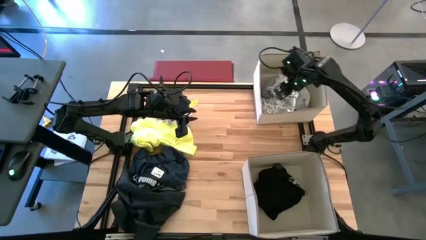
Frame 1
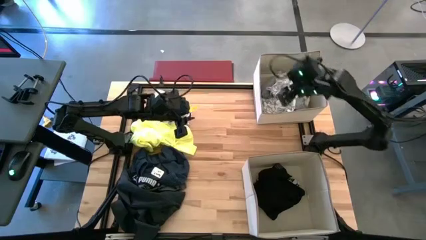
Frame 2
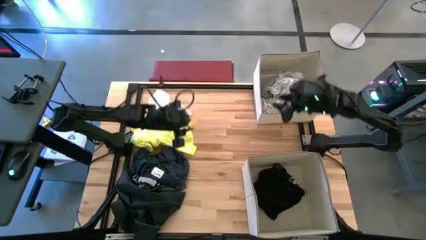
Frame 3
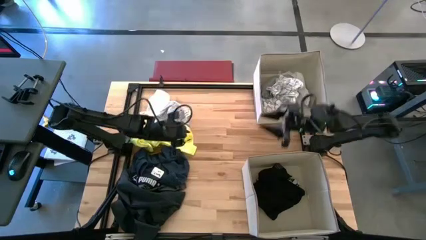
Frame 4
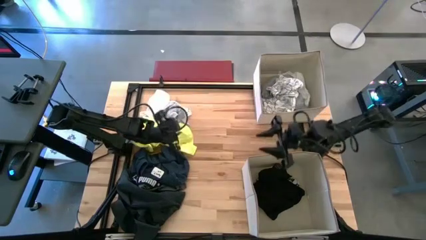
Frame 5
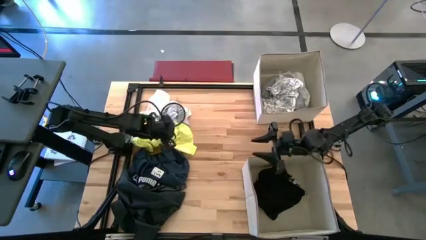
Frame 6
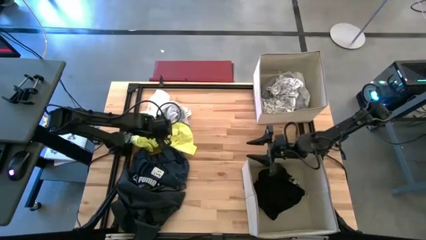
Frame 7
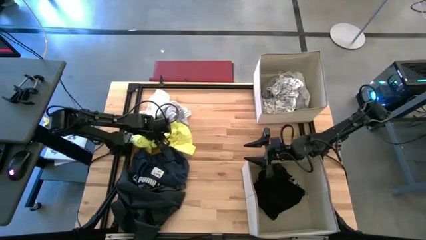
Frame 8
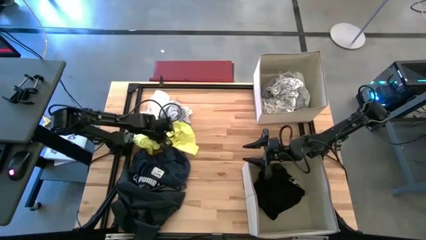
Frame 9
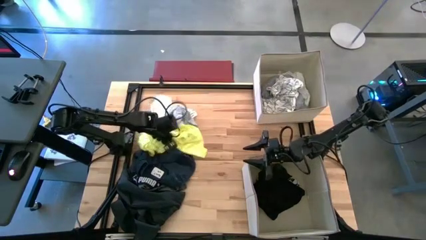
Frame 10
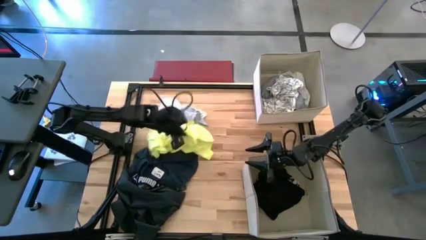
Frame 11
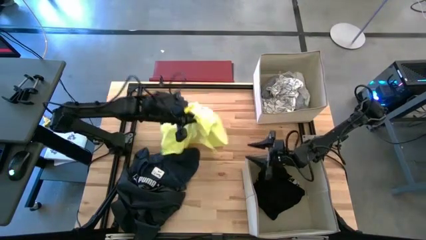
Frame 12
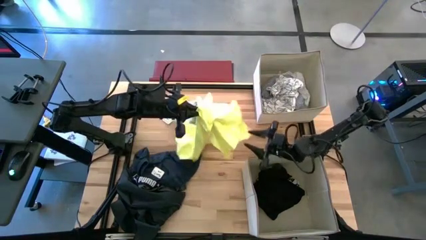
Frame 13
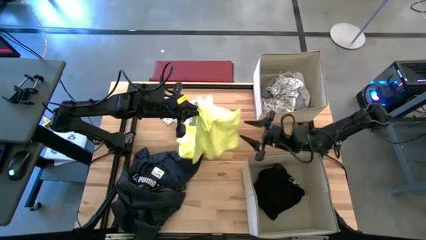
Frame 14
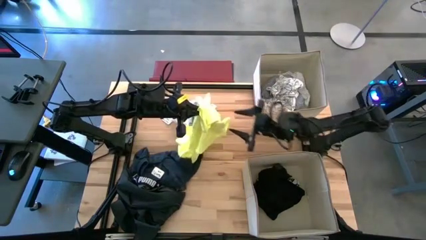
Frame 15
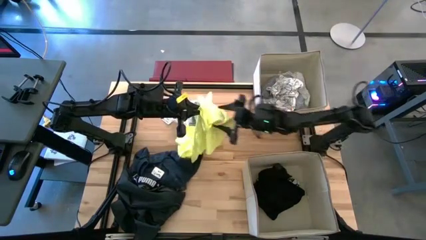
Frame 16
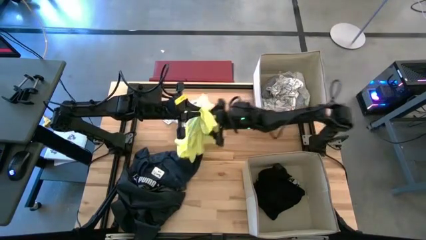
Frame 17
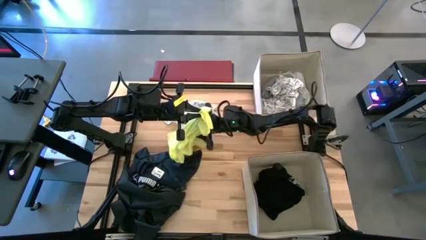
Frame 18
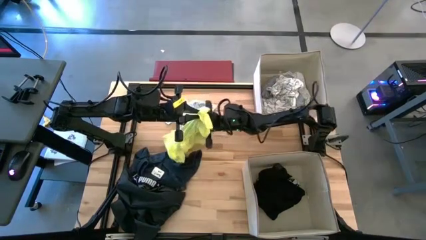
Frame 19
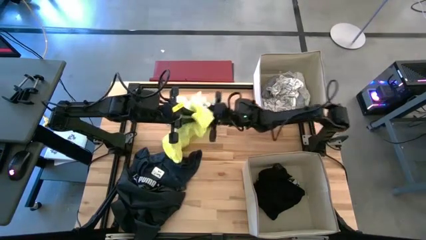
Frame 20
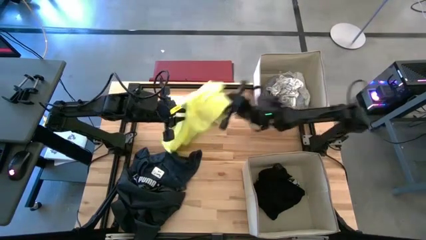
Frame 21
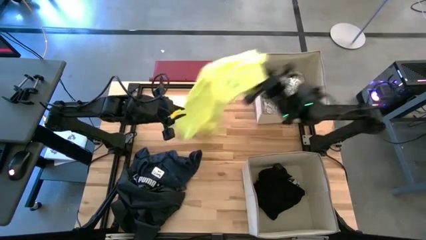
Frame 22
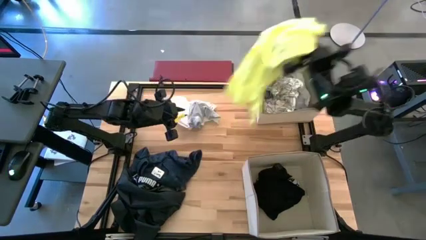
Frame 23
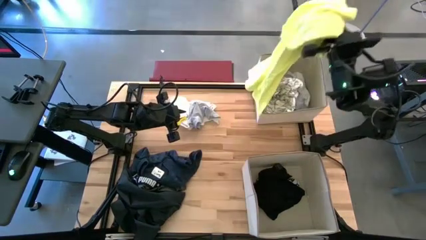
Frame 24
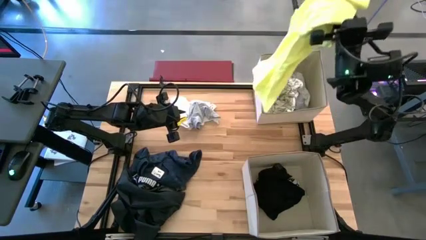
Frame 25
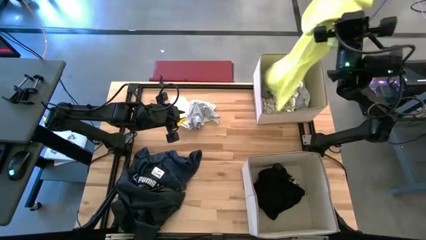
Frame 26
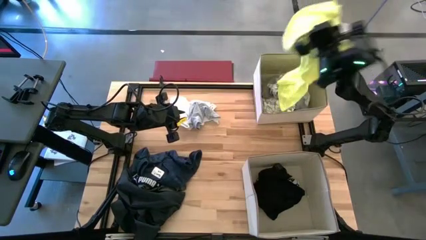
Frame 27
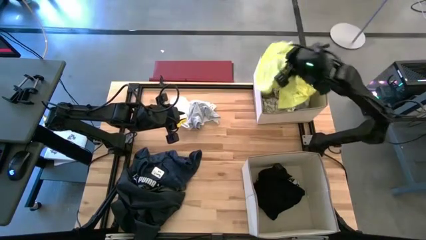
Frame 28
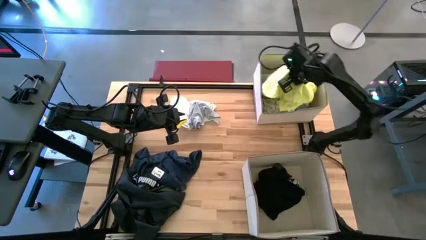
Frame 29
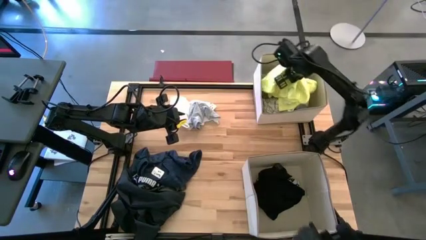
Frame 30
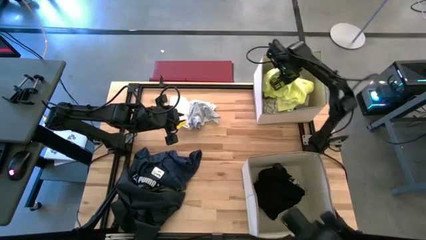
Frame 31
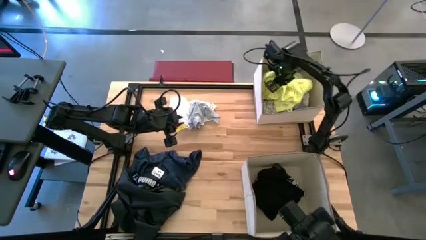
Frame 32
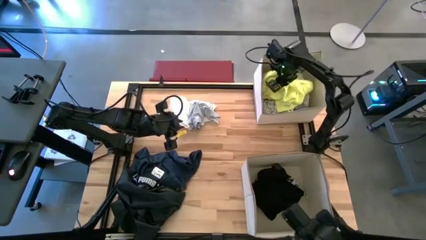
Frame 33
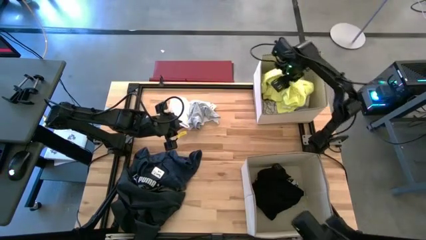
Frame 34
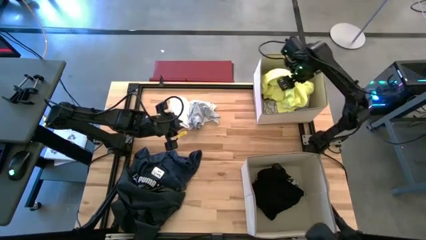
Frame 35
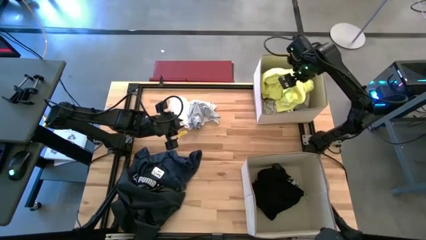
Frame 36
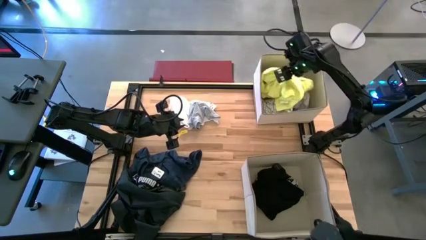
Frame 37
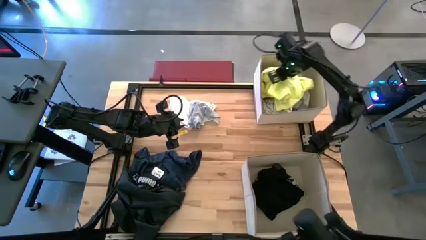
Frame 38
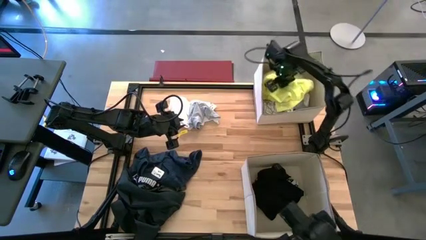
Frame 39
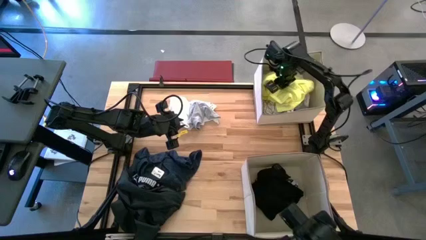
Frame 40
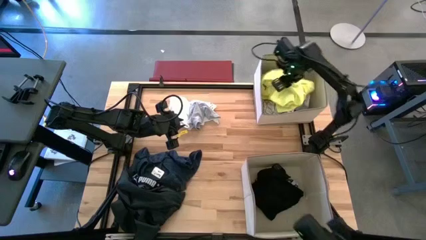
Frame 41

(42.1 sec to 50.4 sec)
Task: Sort clothes
Put the yellow shirt in the top white bin

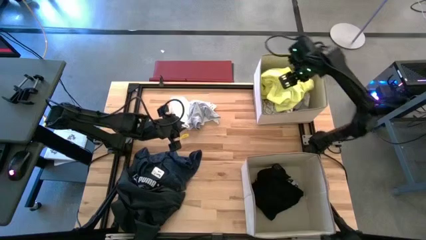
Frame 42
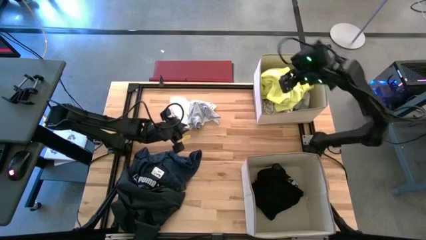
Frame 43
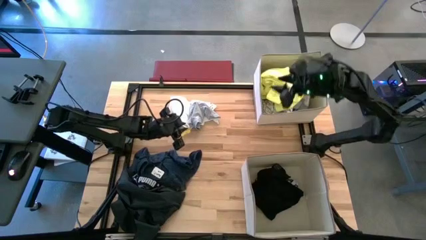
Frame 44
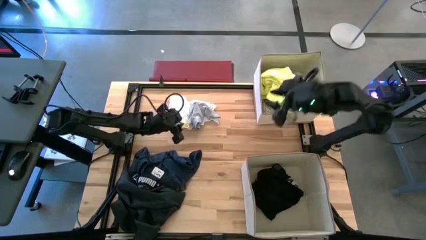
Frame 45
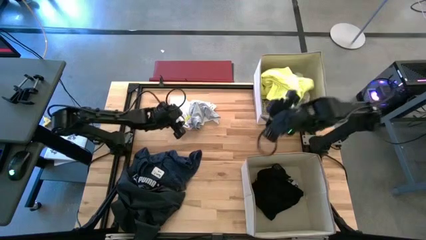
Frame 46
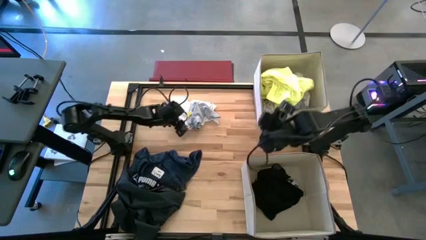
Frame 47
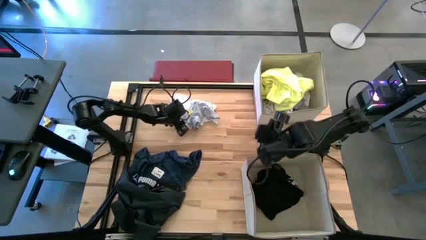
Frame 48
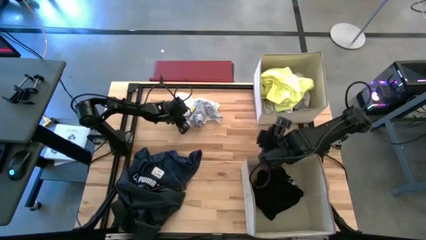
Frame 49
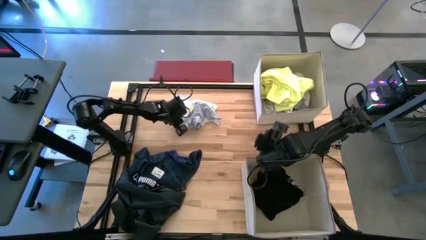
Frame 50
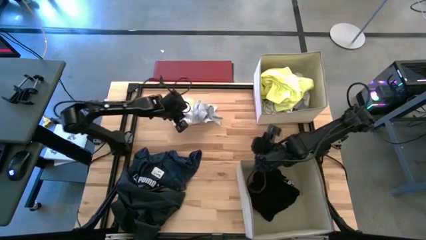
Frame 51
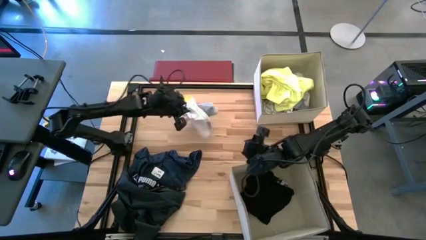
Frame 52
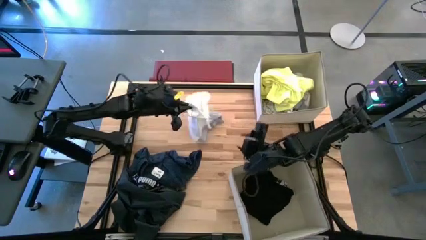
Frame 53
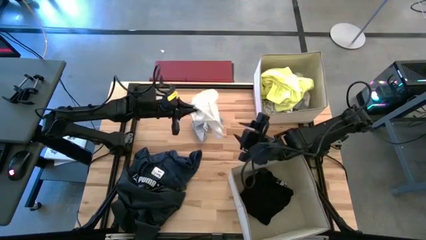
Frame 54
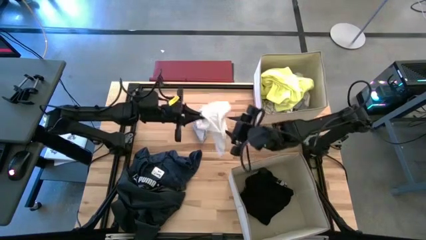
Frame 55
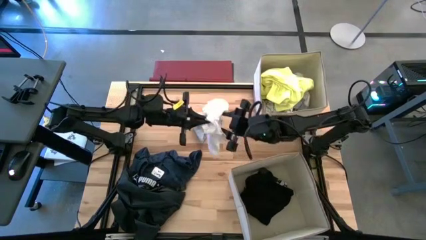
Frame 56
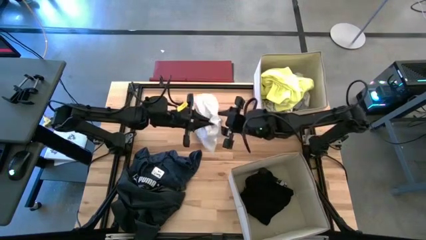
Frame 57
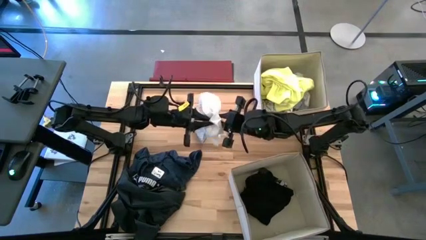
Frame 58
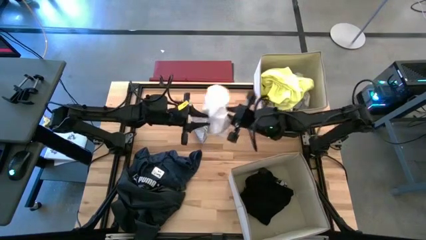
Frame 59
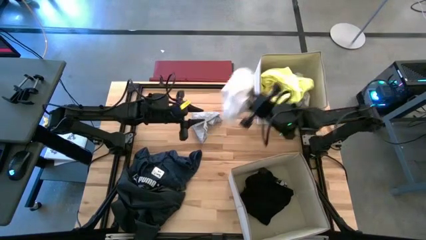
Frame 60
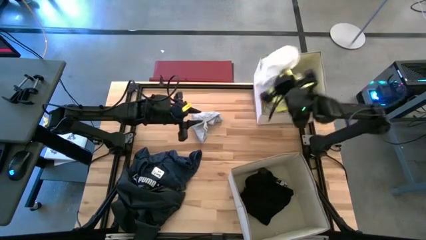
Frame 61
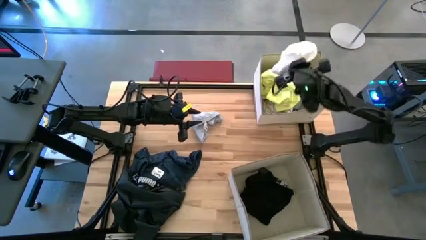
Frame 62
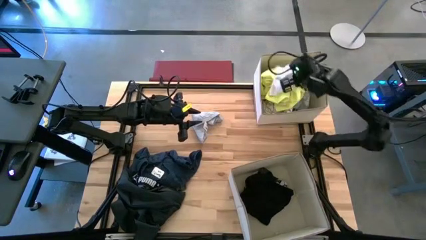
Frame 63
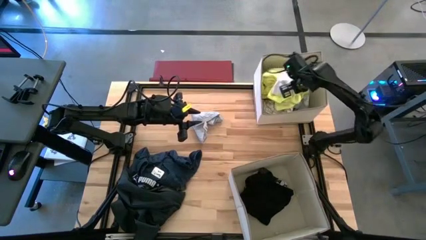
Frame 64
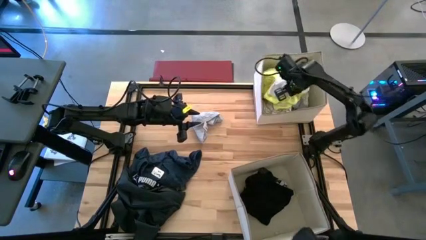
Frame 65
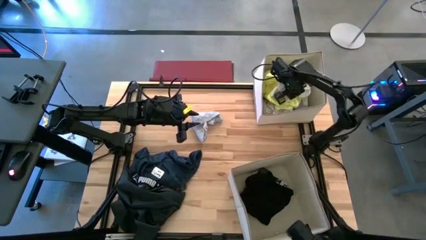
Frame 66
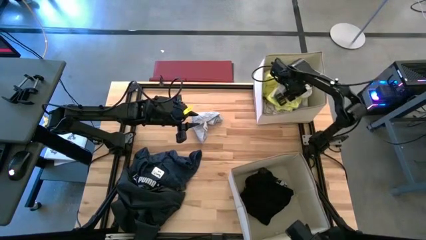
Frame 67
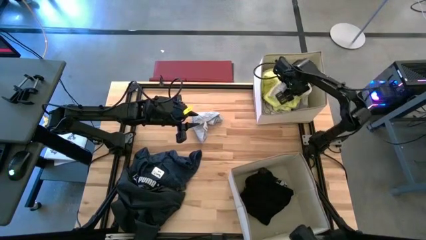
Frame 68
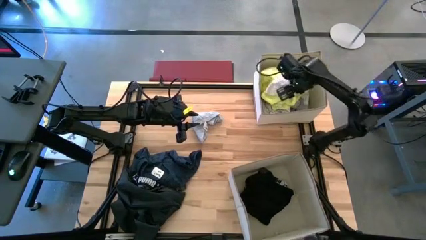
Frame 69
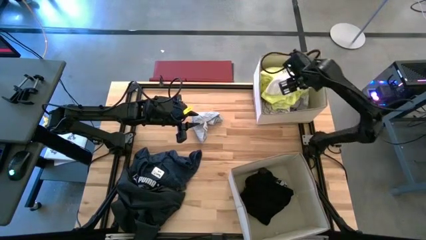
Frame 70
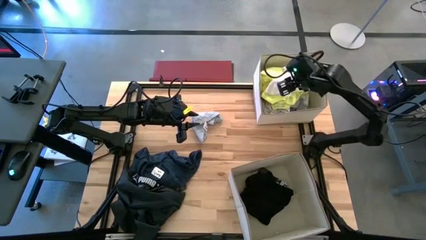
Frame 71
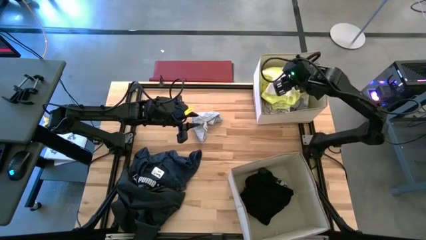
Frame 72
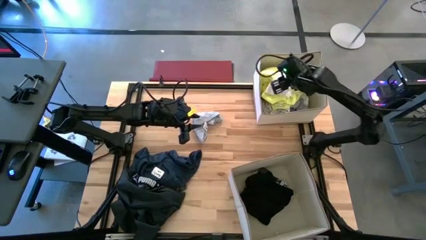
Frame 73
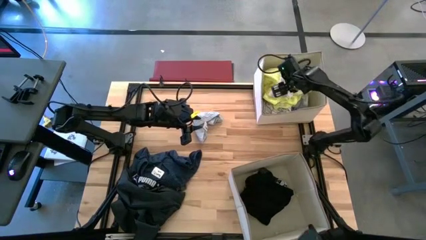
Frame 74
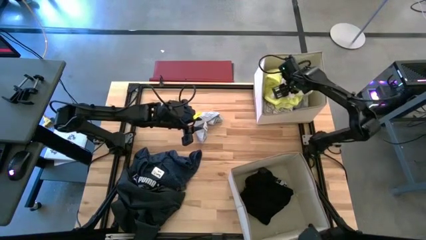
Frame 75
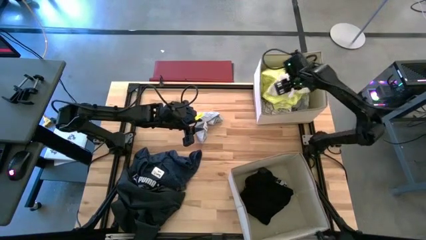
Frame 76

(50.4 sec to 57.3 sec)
Put the white shorts in the top white bin

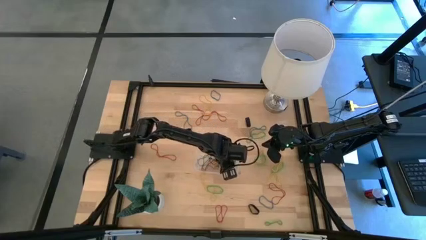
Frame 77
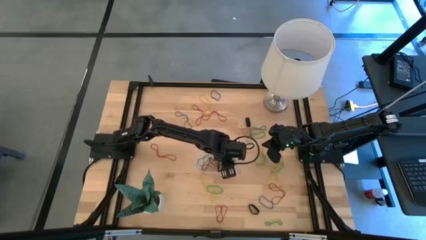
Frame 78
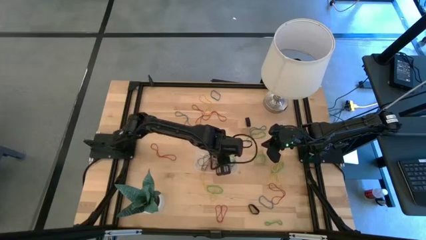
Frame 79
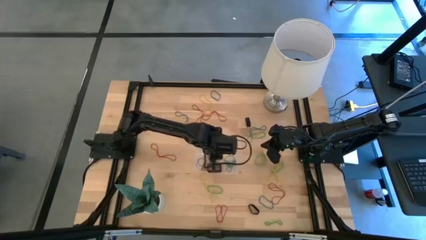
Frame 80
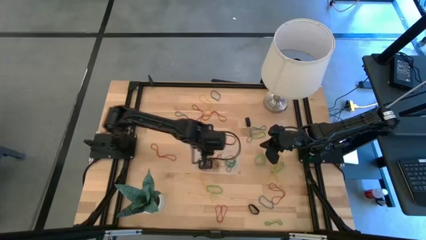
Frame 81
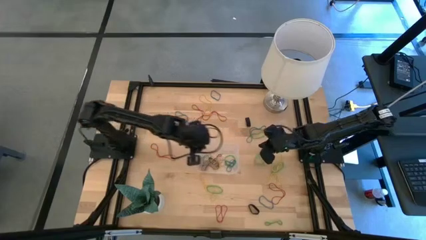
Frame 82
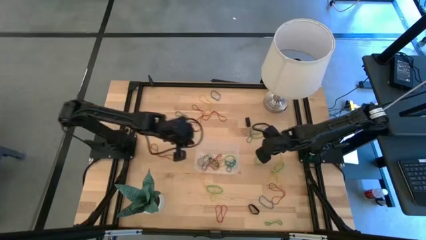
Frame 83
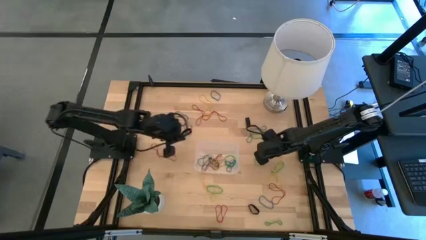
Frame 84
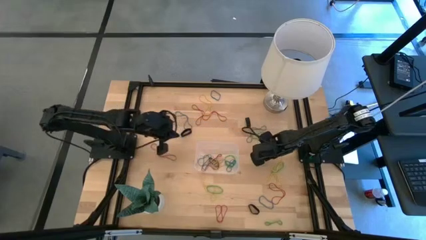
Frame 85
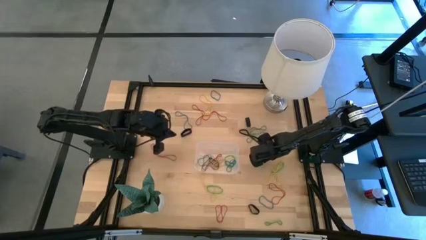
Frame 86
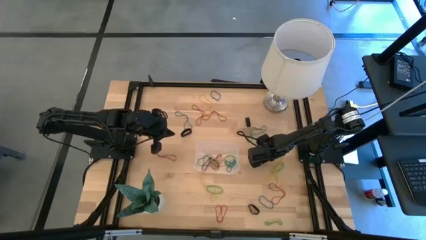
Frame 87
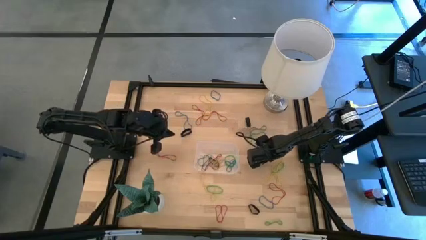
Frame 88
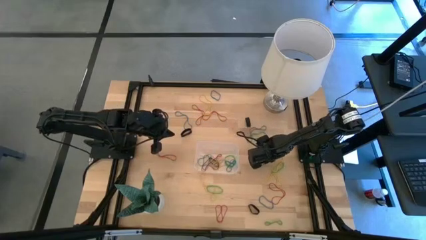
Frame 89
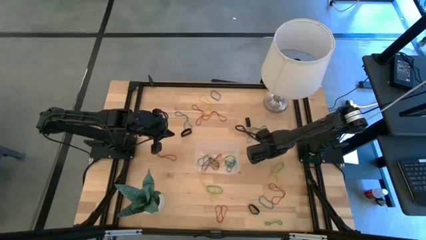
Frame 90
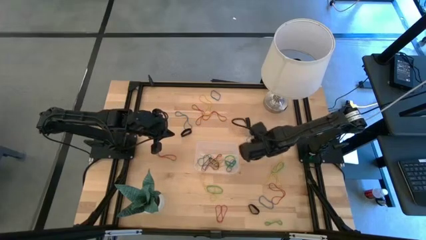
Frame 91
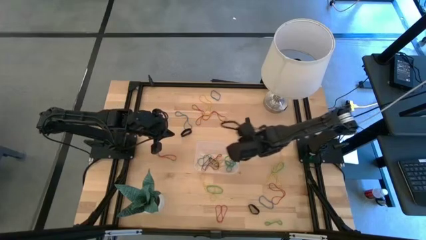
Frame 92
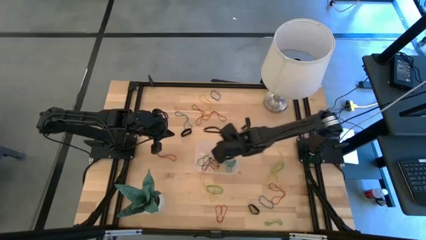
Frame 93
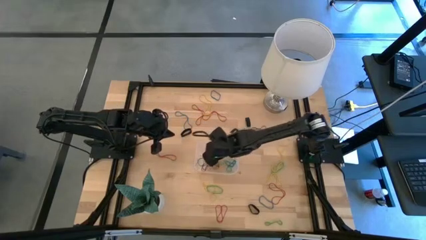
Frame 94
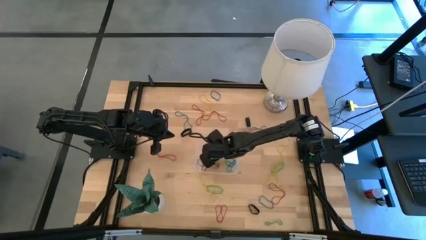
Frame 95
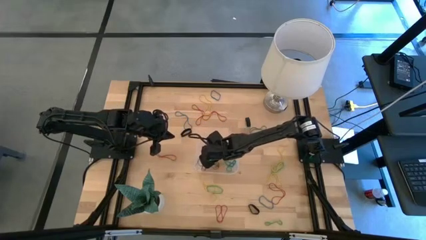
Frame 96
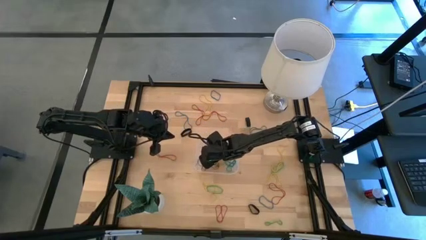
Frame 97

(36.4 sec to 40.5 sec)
Task: Pick and place rubber bands into bin
Put the green rubber band into the transparent bin
